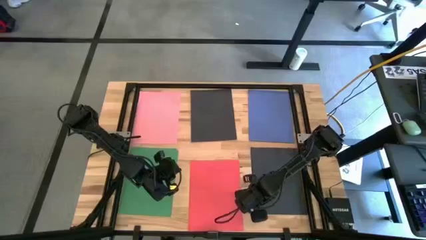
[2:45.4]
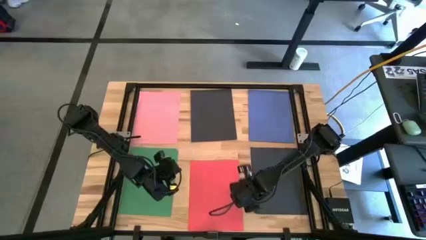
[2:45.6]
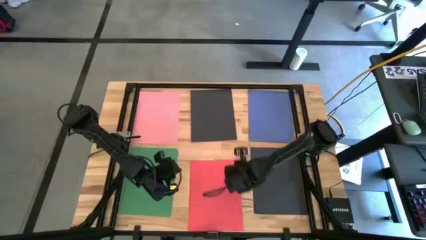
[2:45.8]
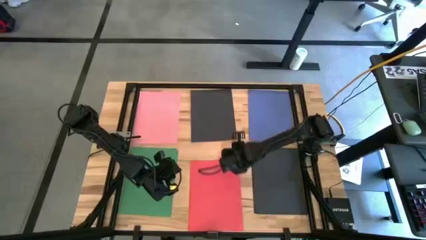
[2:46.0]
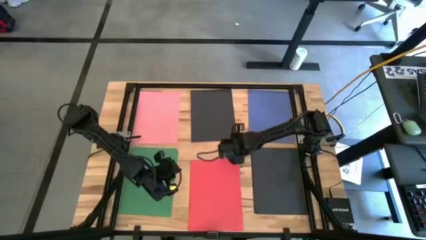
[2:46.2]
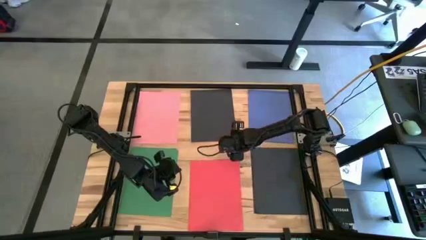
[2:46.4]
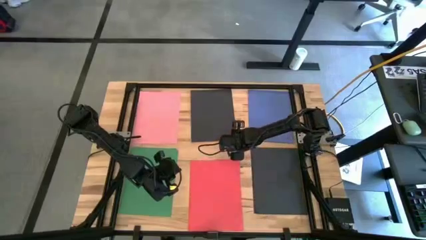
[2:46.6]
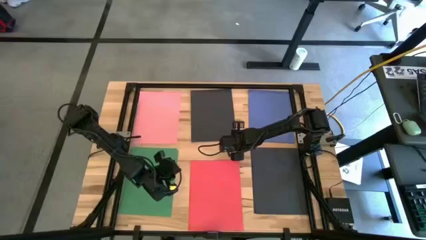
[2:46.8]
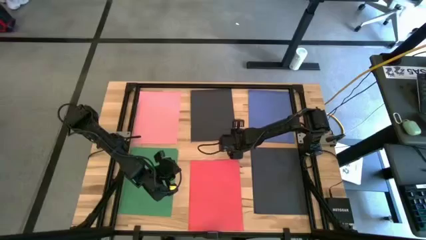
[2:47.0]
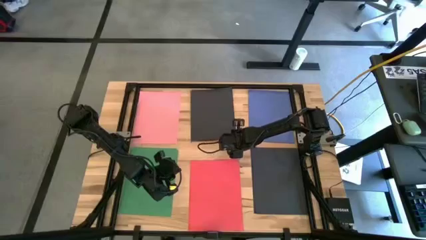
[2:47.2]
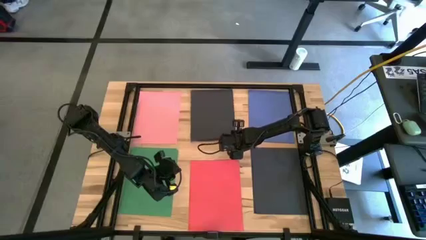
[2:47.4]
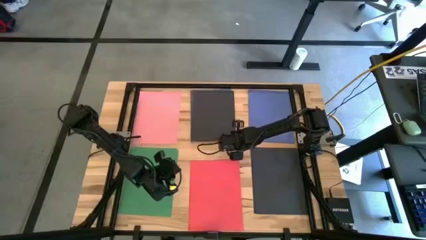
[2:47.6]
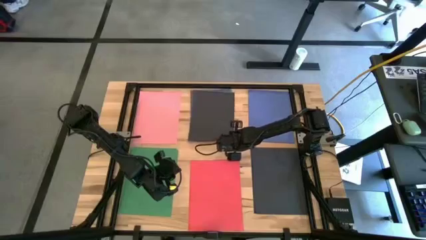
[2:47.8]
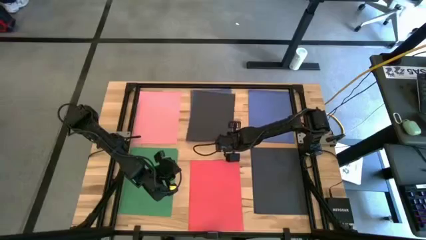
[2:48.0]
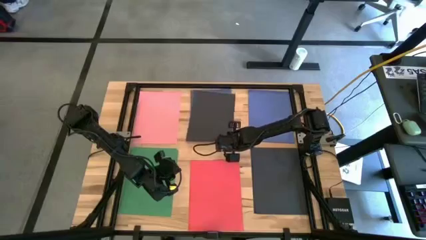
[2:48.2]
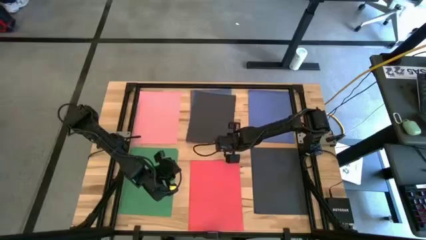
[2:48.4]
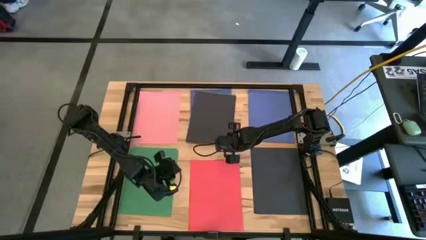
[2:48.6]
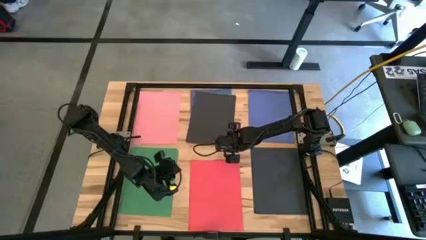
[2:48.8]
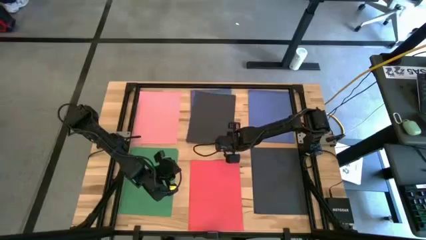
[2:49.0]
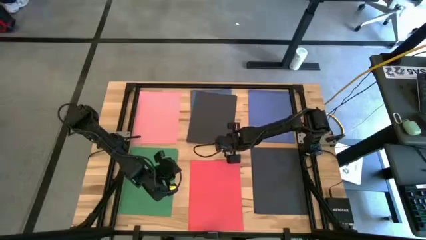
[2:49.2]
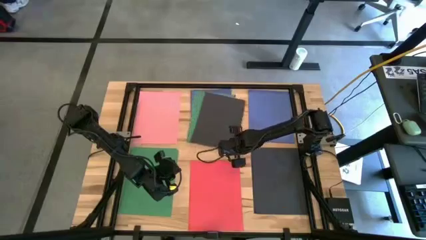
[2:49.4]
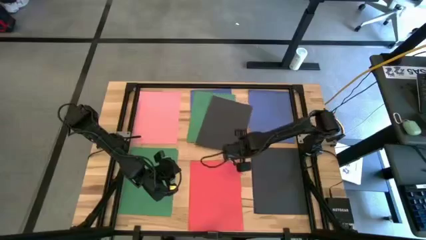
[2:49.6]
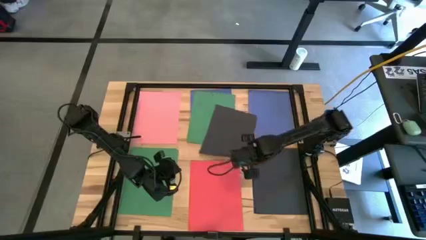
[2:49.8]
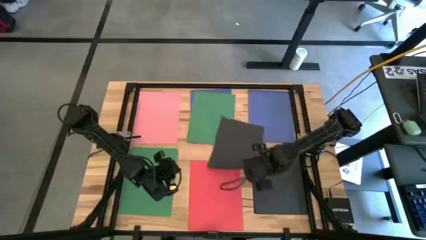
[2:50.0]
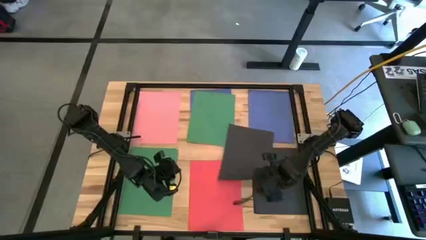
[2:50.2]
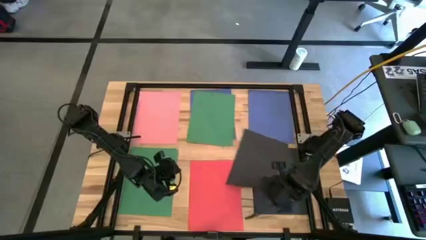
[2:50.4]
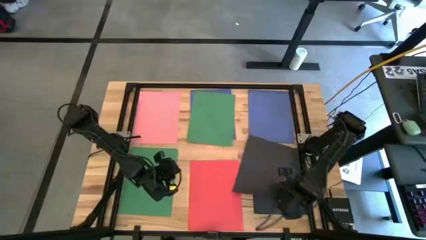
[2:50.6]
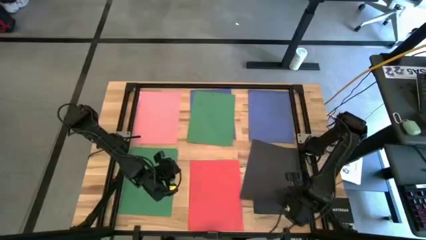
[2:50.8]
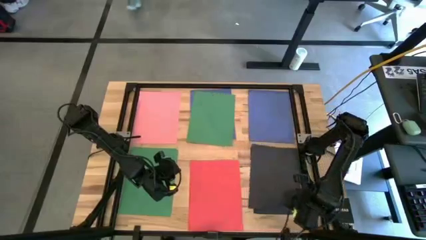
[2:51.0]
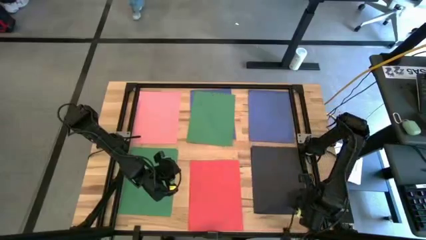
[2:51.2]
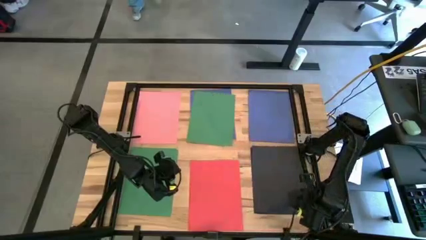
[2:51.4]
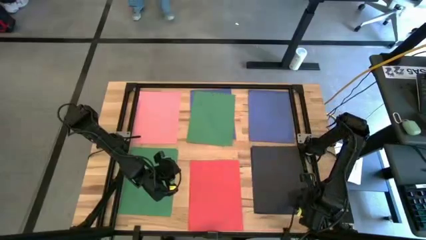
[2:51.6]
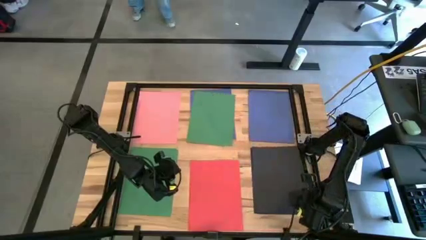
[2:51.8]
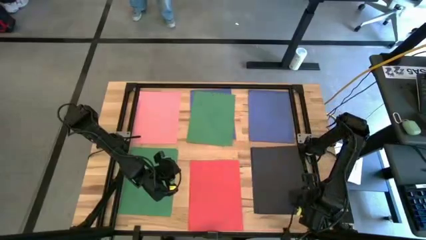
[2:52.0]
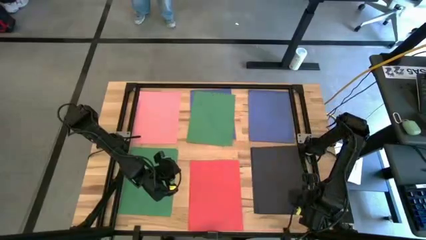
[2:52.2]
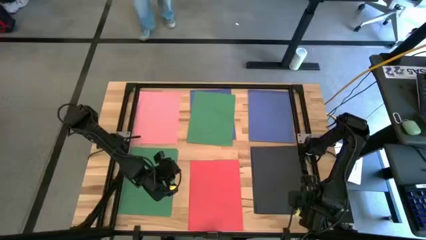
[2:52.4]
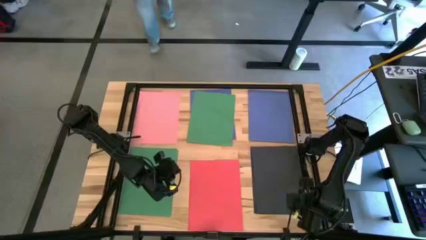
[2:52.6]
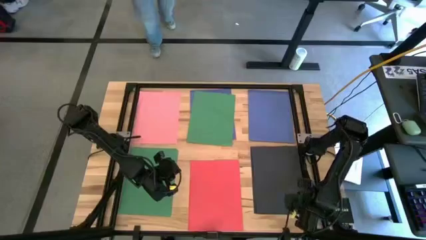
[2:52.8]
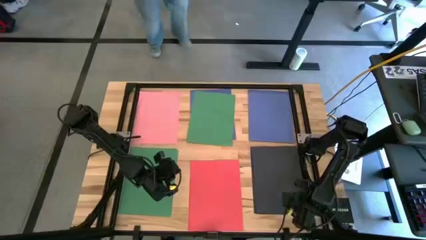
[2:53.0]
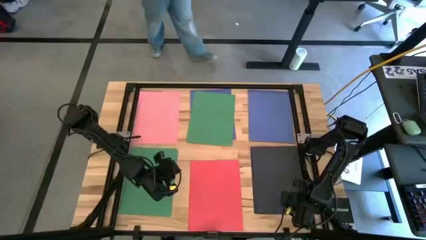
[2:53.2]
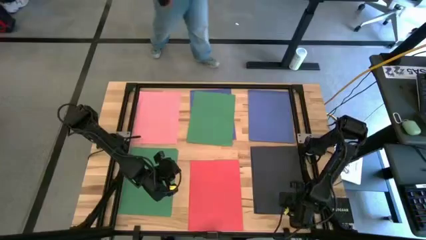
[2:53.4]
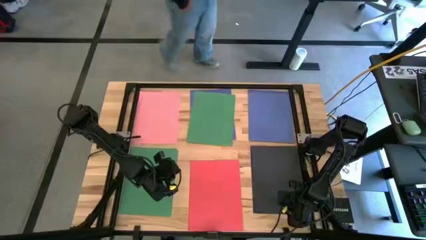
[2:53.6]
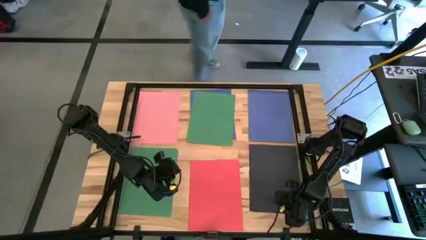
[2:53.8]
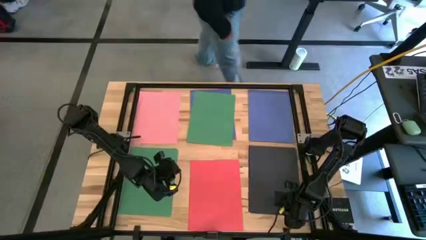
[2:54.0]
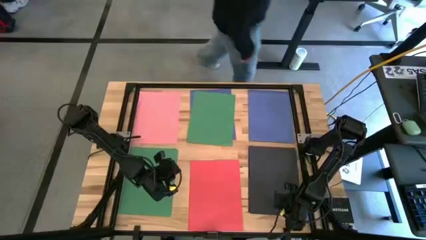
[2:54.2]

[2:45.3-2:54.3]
Task: Organize paper
Stack the black paper on top of the black paper

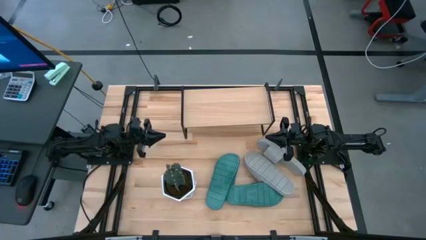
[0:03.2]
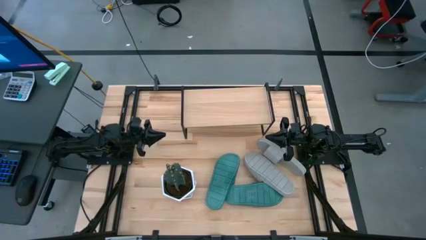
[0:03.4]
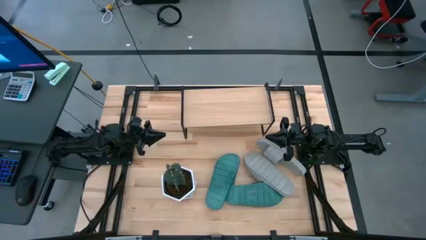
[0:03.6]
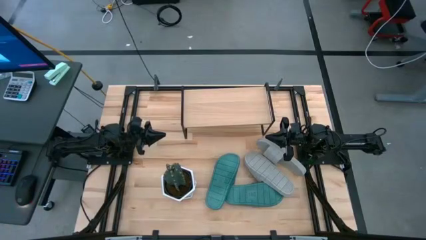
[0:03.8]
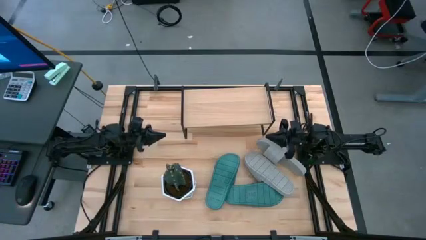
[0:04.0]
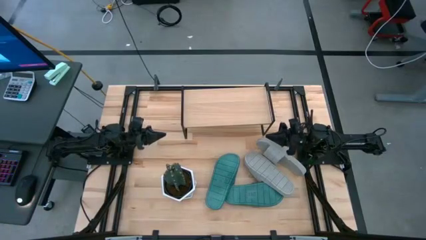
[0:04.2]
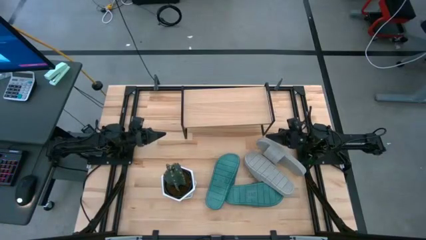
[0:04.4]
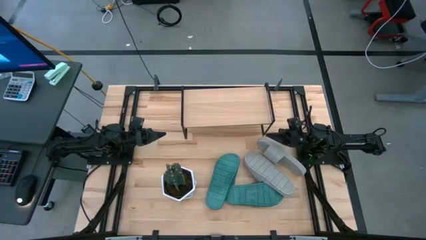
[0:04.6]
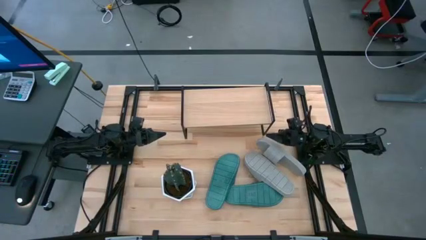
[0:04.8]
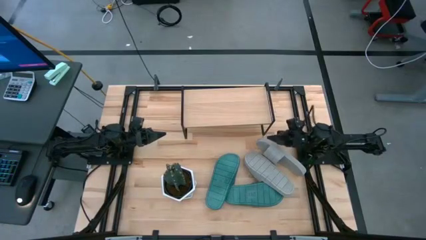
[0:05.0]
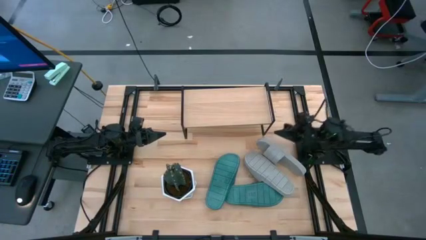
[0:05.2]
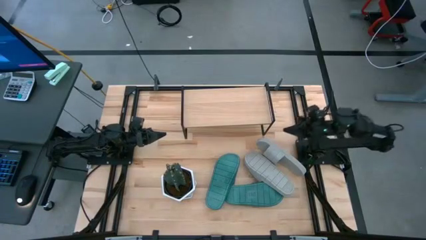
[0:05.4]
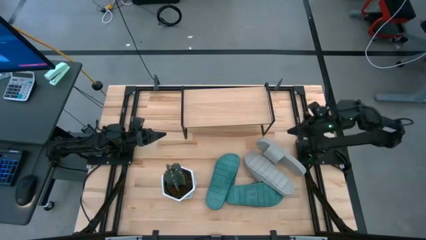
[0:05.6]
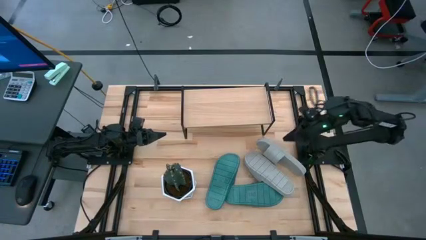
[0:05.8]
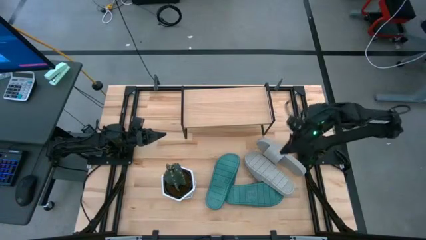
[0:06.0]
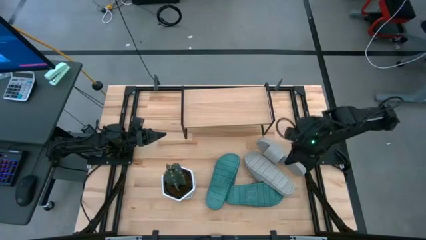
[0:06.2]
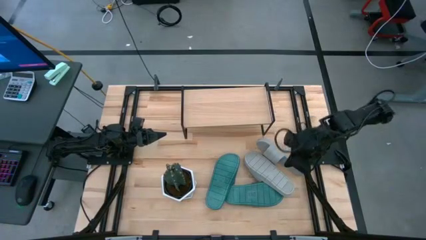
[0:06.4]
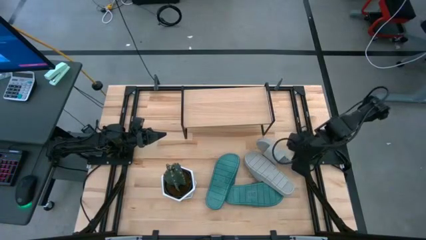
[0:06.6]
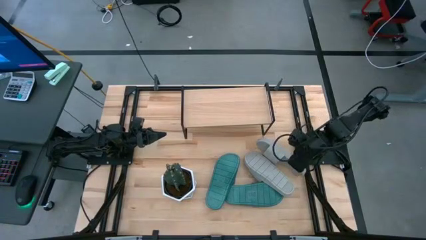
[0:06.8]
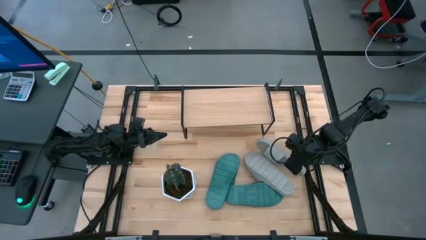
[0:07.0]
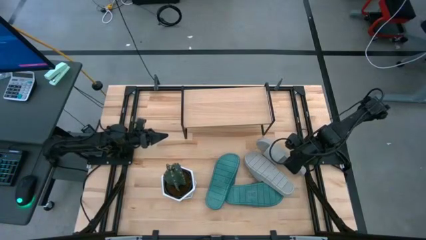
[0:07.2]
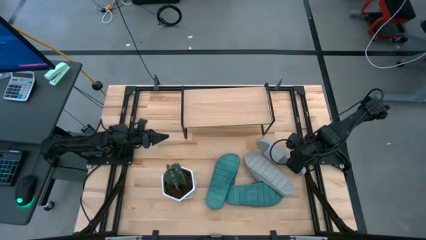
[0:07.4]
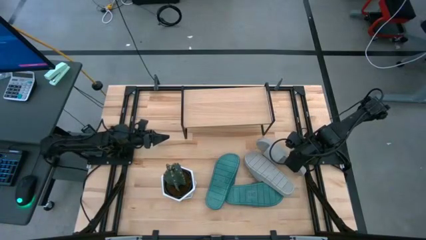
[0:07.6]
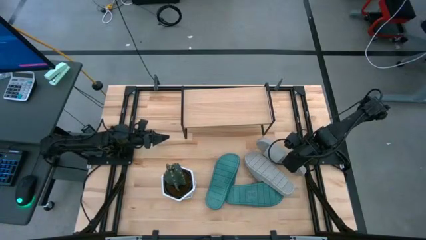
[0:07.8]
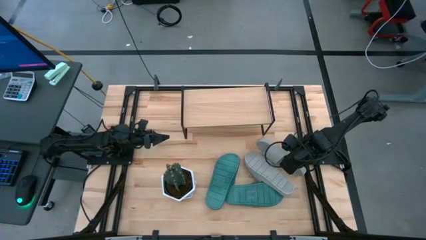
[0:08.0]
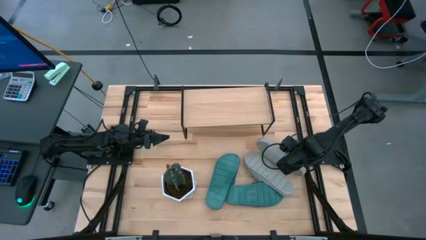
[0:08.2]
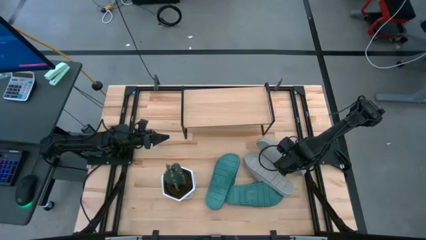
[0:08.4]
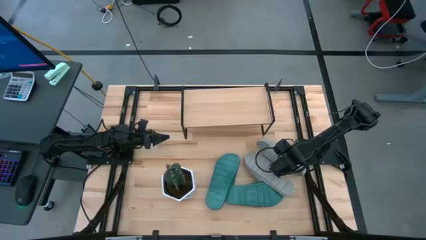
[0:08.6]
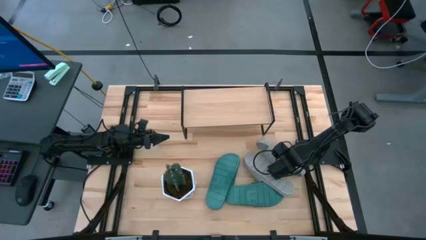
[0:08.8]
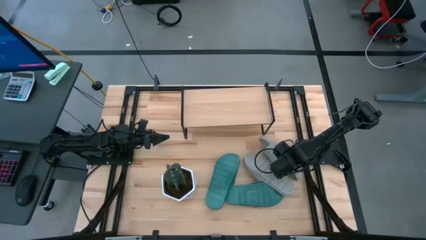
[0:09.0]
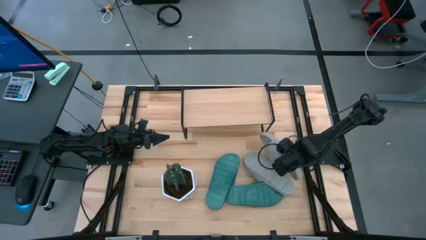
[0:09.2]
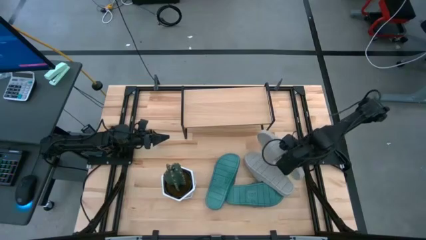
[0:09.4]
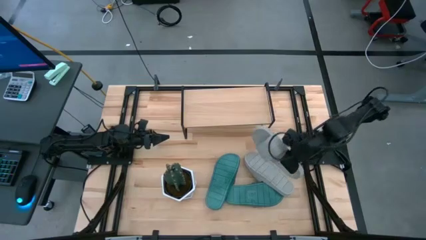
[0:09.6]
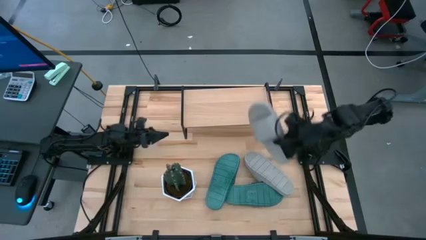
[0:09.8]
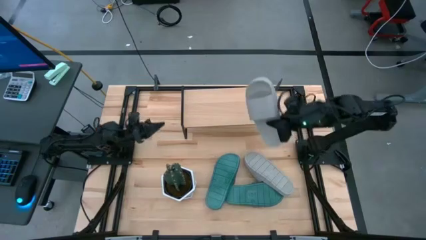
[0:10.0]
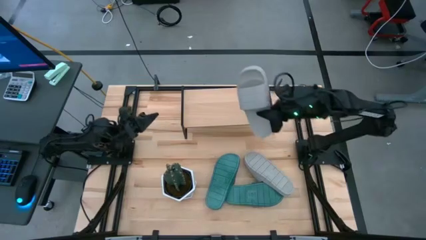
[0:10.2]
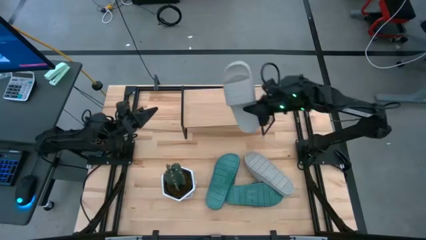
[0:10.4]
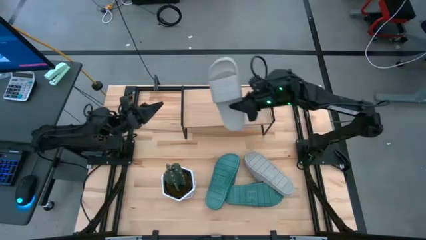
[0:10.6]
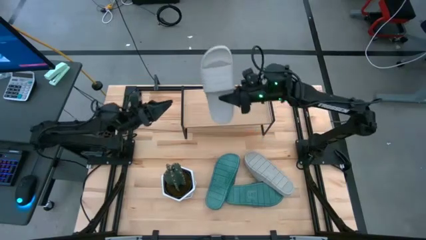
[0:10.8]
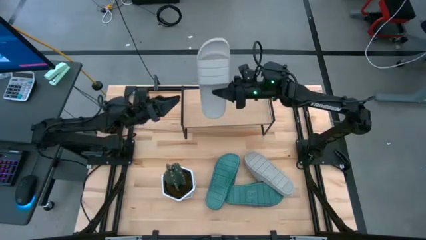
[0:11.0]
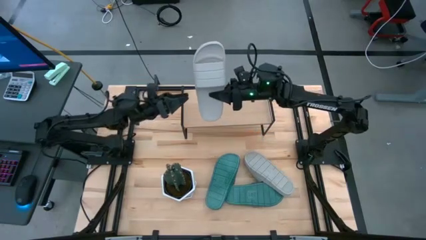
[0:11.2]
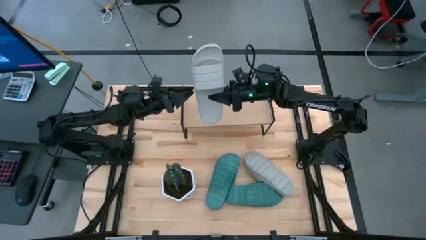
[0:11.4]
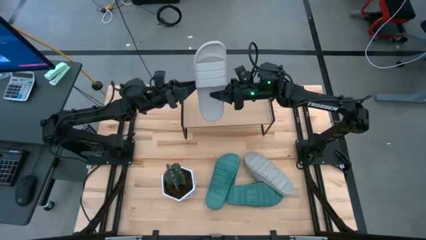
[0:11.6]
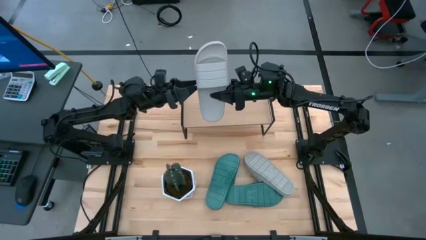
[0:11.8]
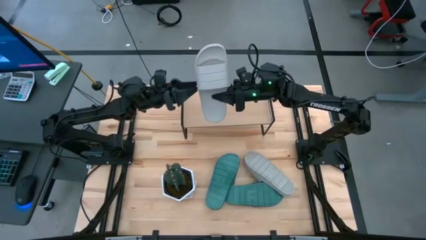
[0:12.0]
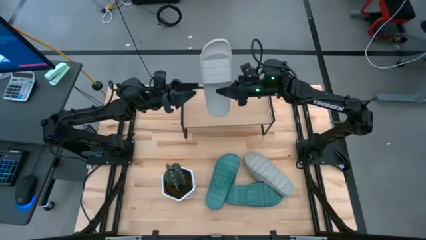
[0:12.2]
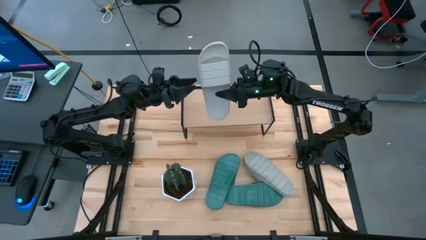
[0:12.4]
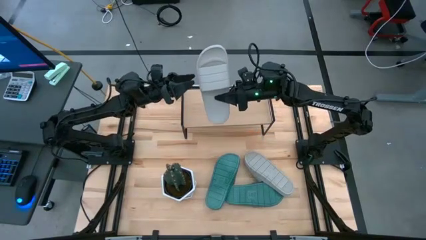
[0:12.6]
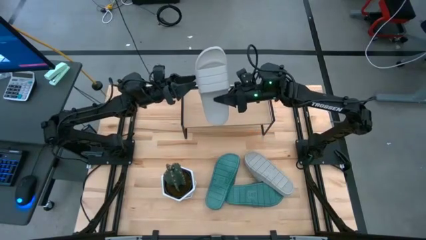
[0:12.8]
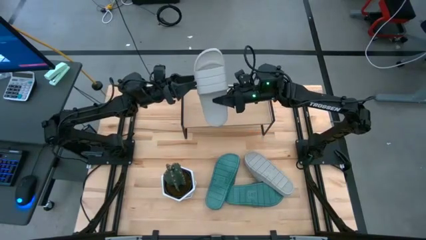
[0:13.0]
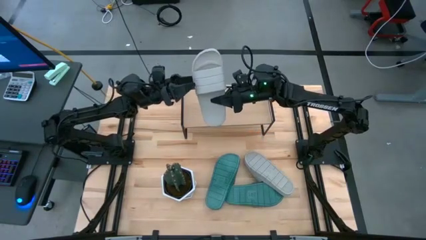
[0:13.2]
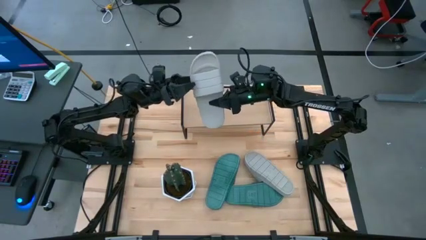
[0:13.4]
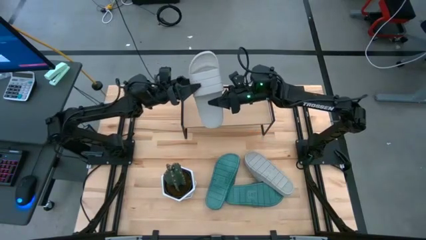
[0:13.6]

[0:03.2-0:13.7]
Task: Pick and place slides into the shelf
Put the right gray slides on the shelf
